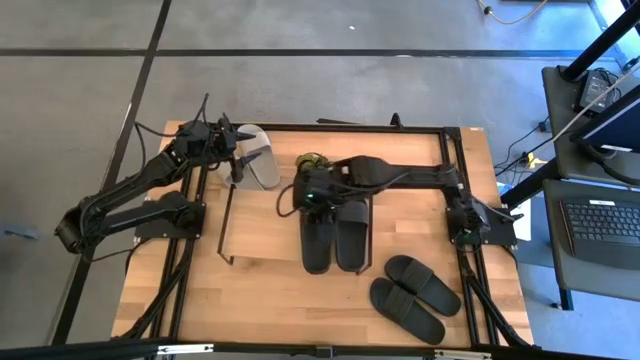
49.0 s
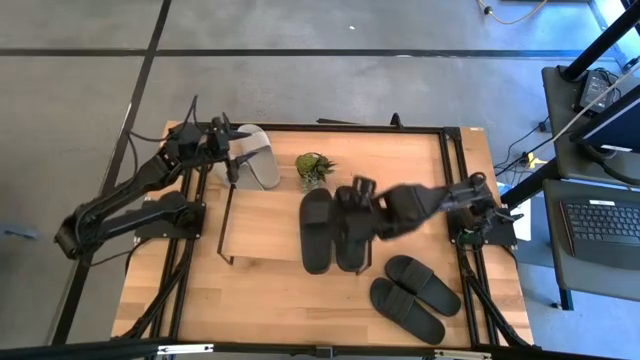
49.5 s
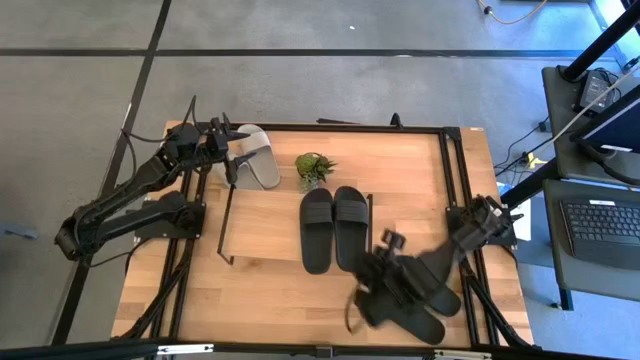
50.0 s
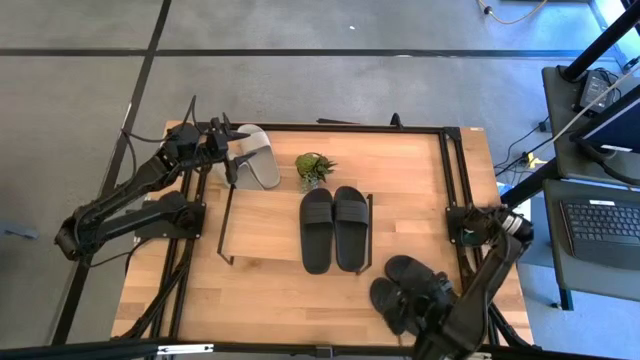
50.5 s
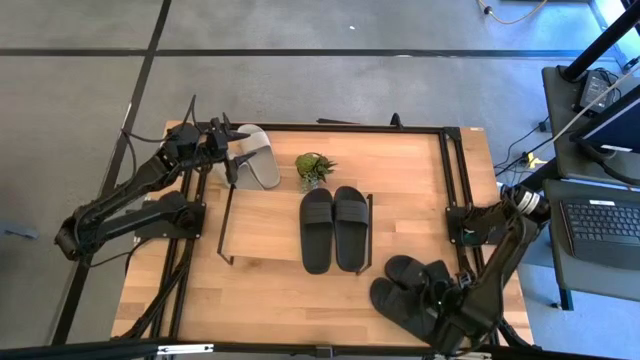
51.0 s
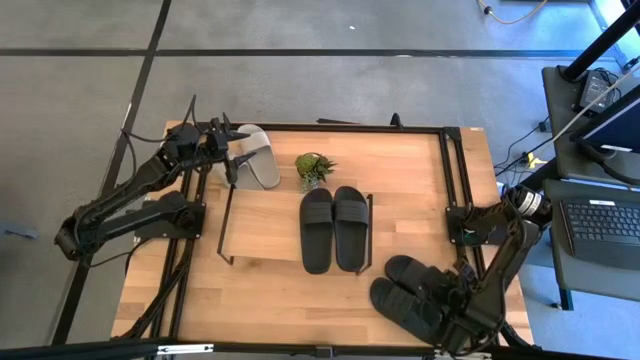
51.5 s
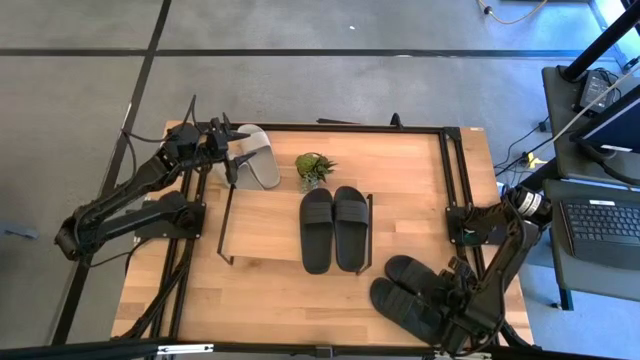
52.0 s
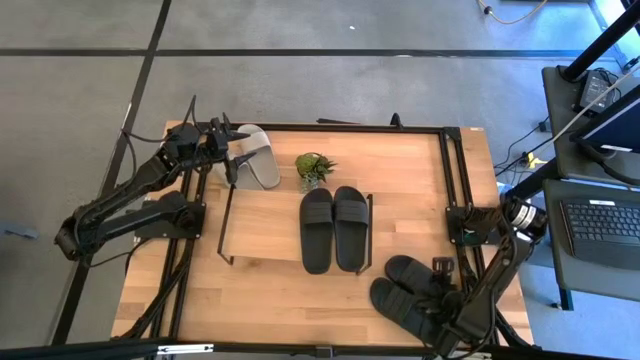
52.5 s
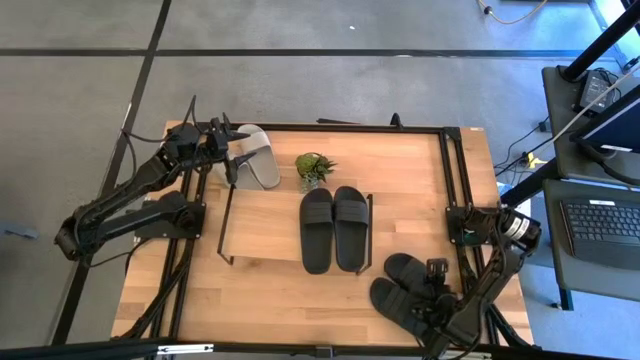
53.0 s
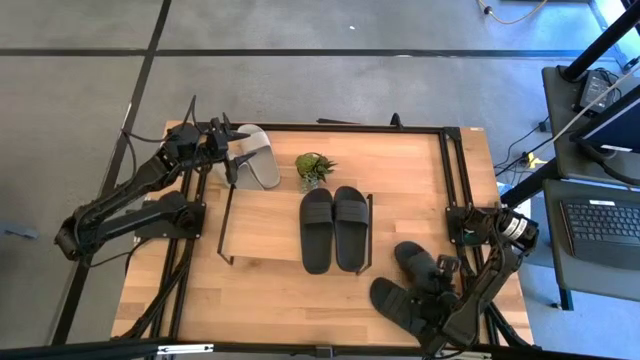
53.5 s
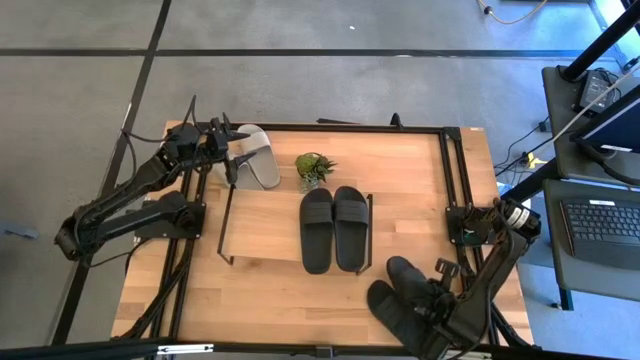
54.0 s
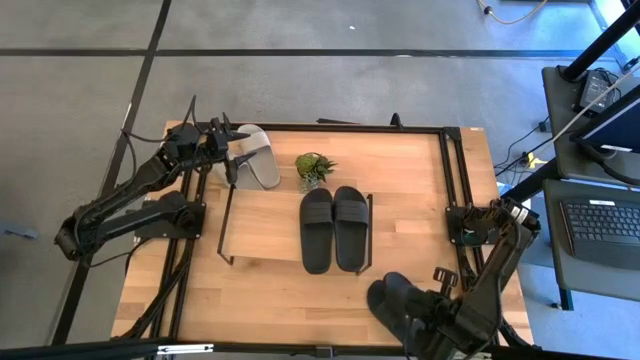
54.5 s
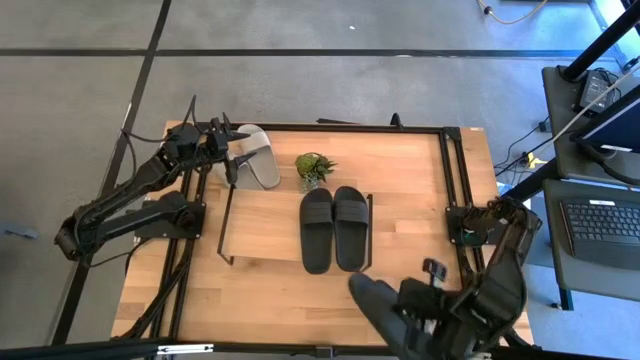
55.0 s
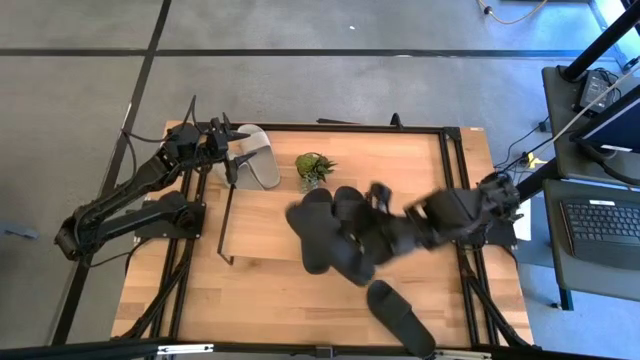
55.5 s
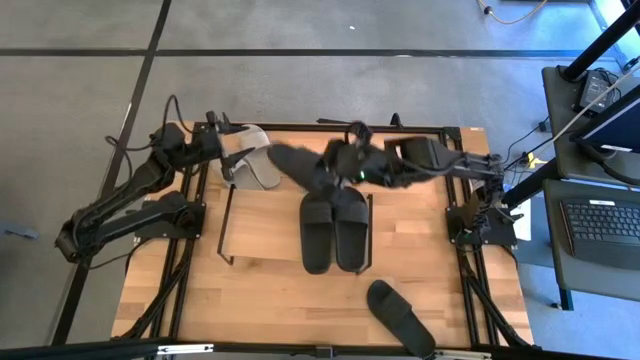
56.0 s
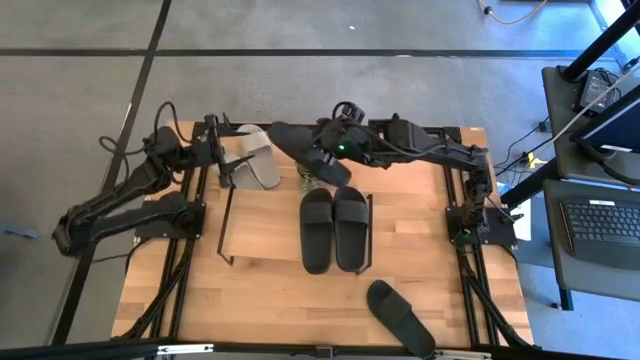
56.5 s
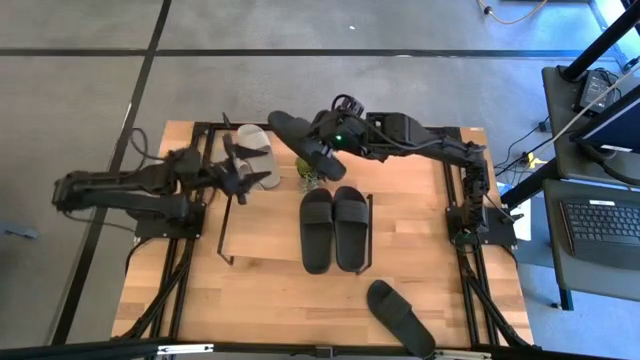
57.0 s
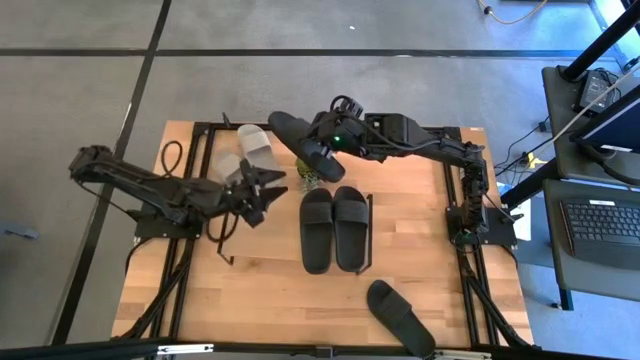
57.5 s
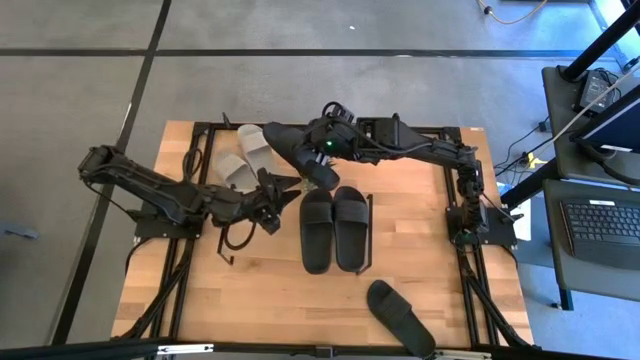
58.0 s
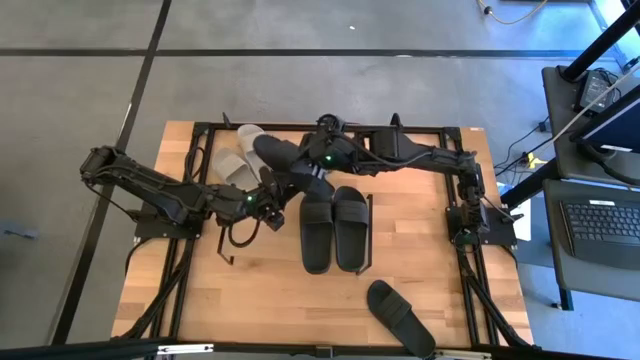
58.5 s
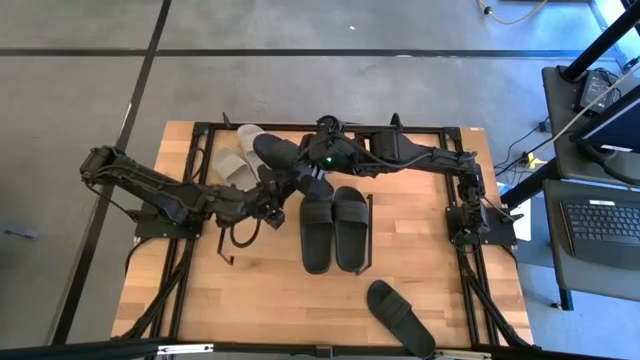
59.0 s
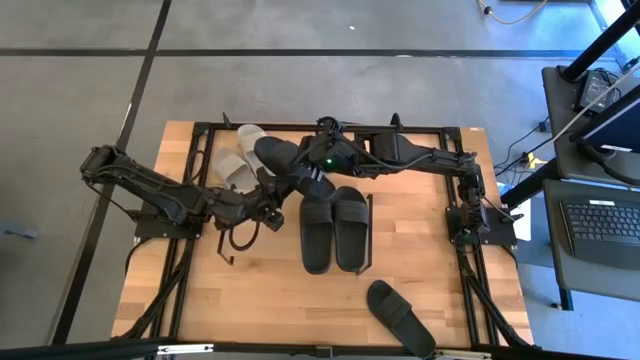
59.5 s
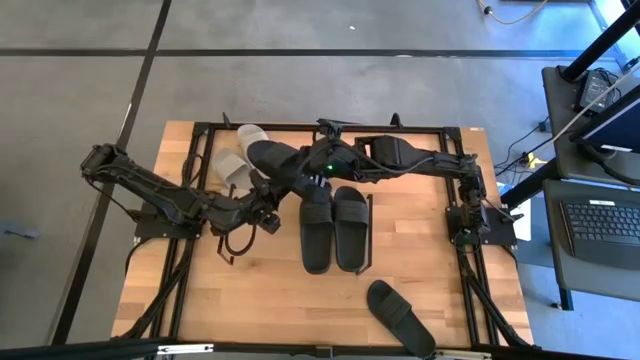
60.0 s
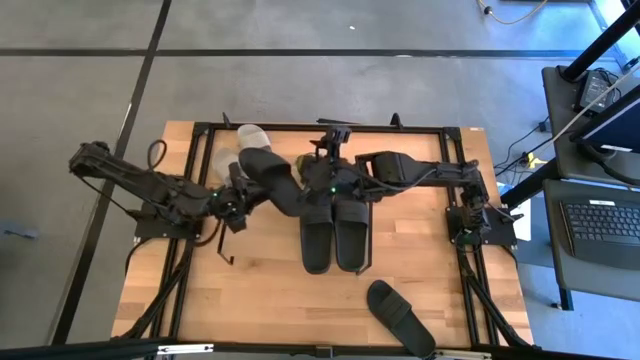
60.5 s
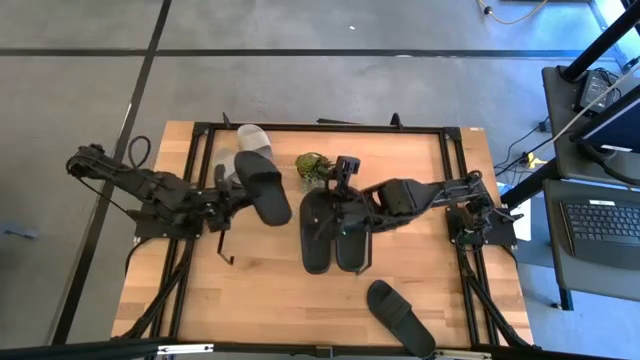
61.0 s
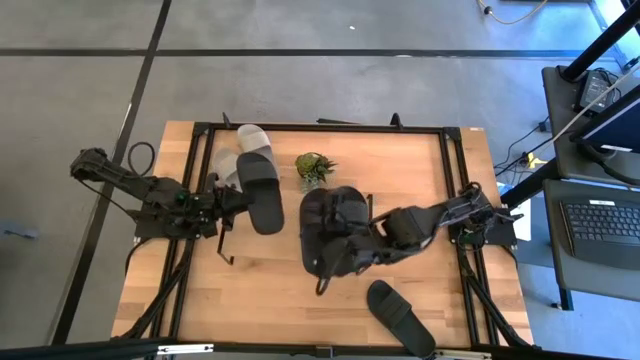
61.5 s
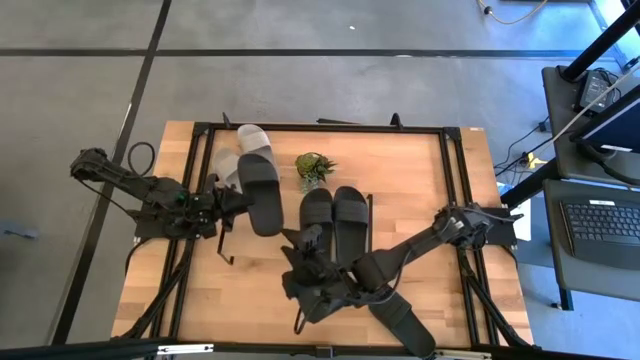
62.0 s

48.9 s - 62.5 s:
Task: Pick and place slides into the shelf
Put the black slide on the shelf

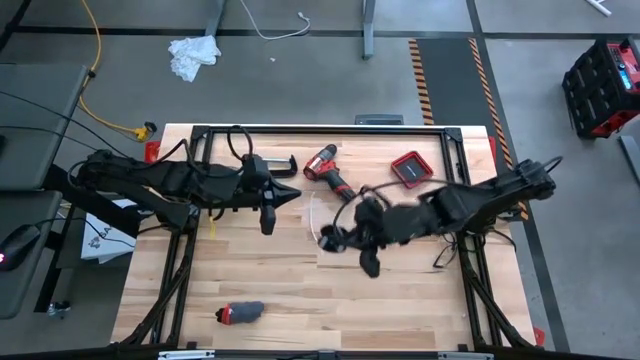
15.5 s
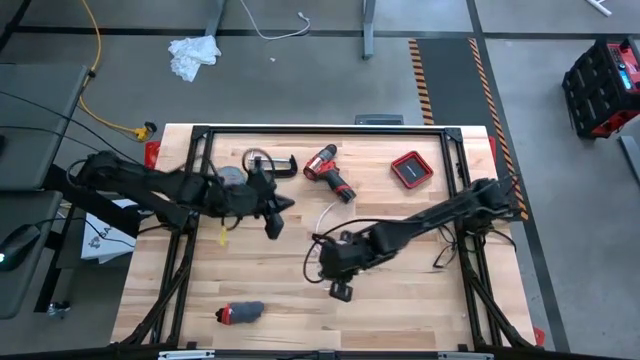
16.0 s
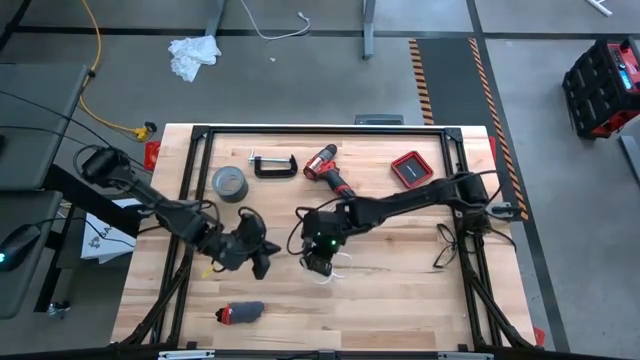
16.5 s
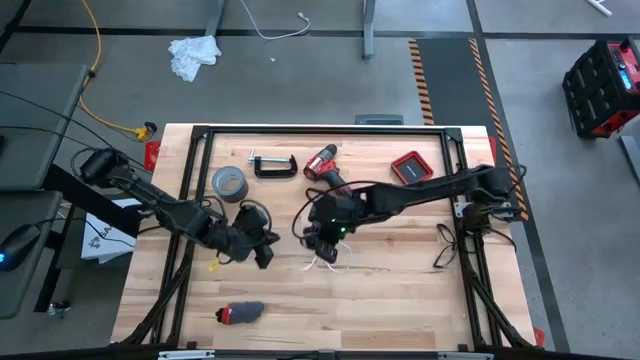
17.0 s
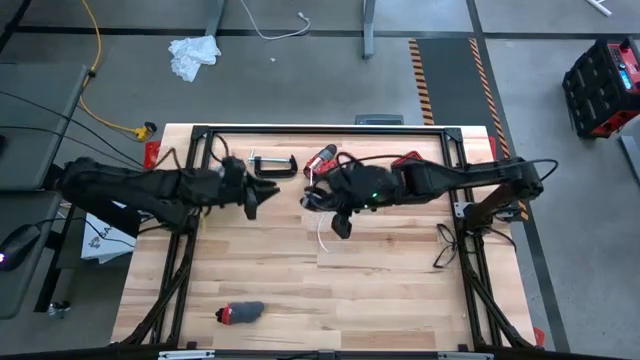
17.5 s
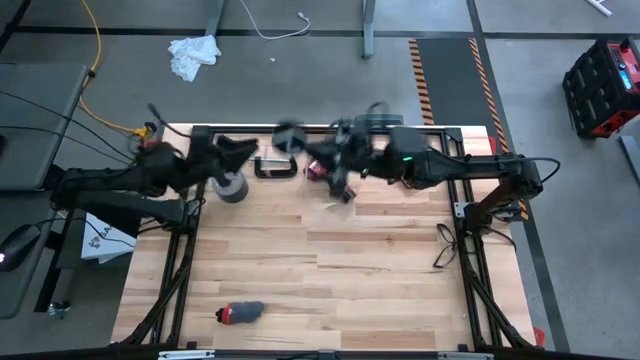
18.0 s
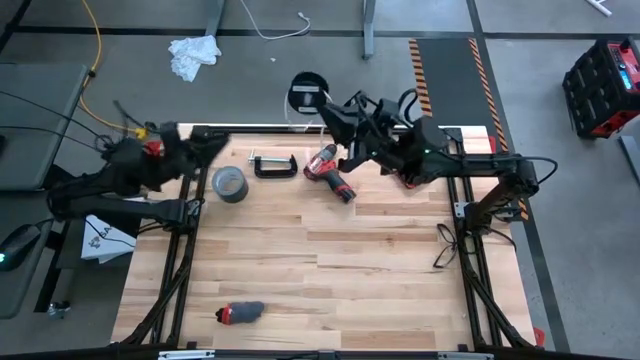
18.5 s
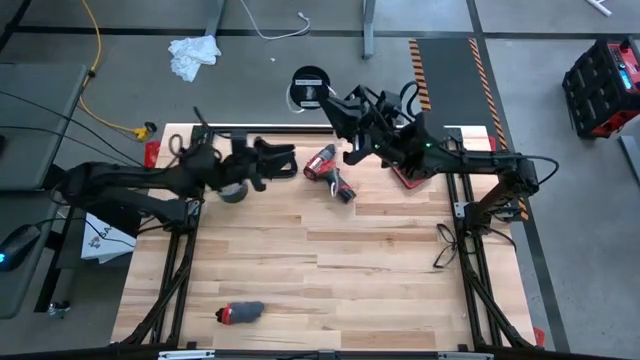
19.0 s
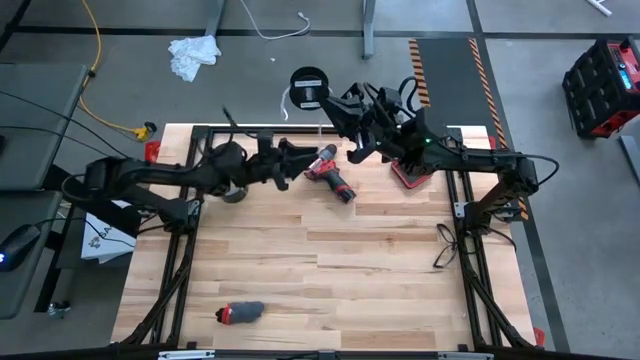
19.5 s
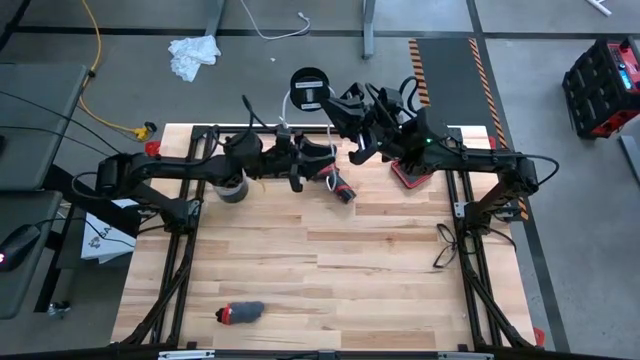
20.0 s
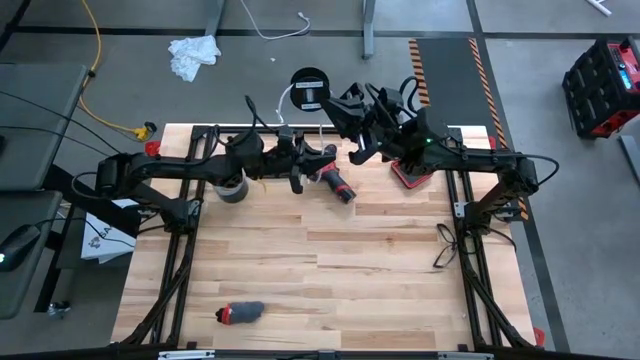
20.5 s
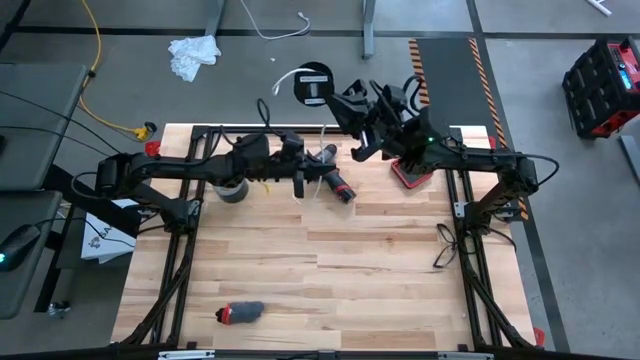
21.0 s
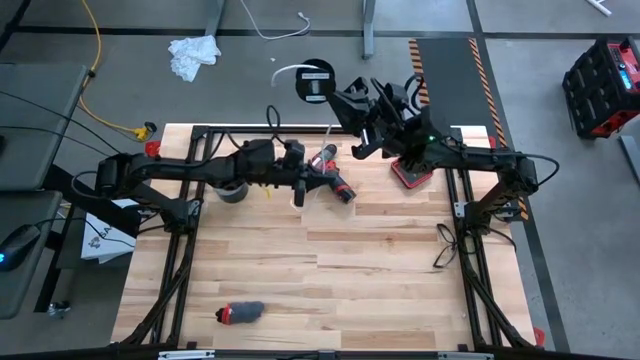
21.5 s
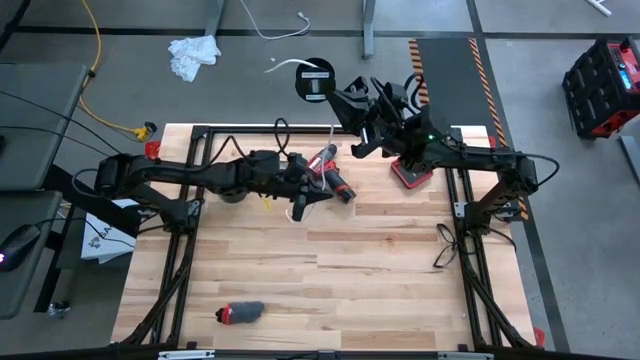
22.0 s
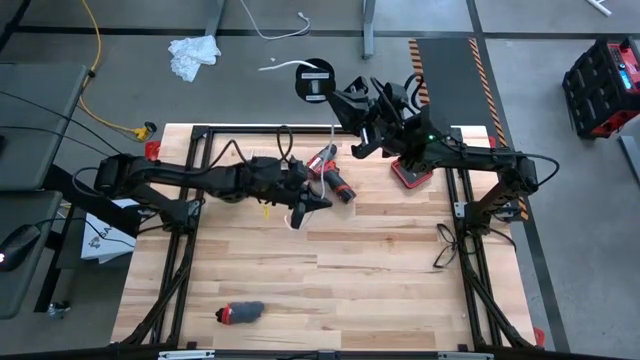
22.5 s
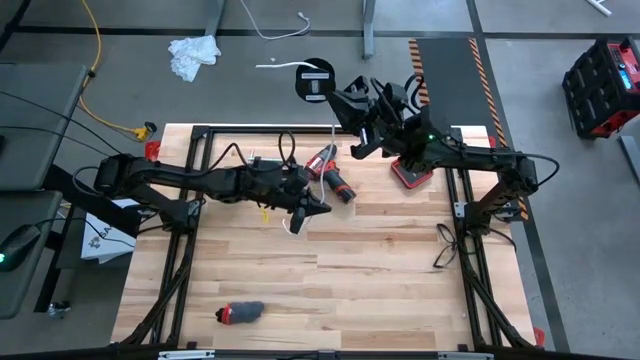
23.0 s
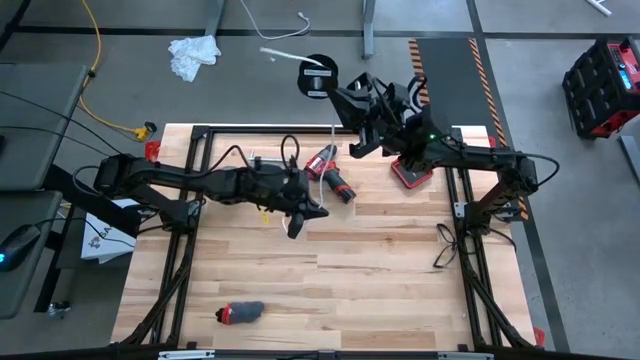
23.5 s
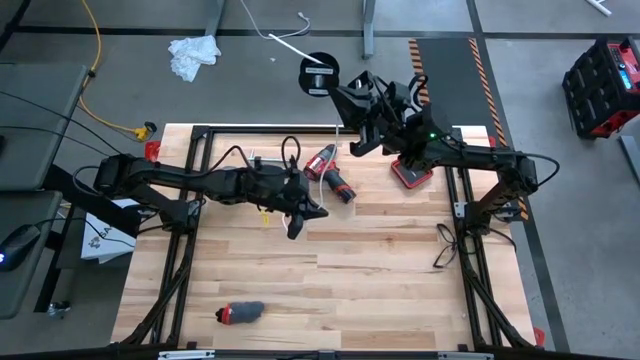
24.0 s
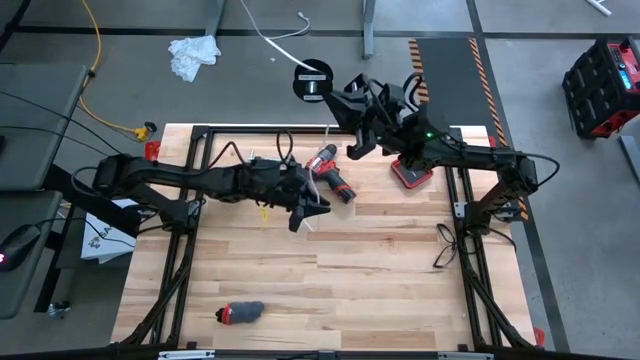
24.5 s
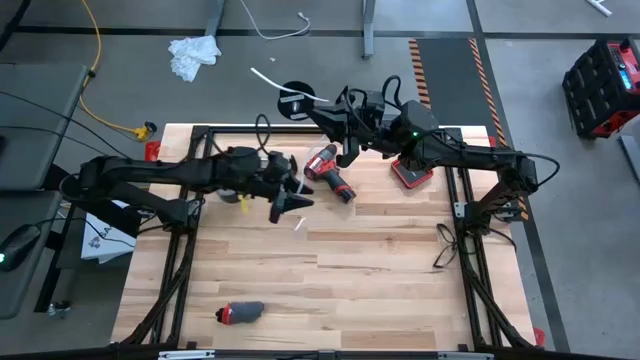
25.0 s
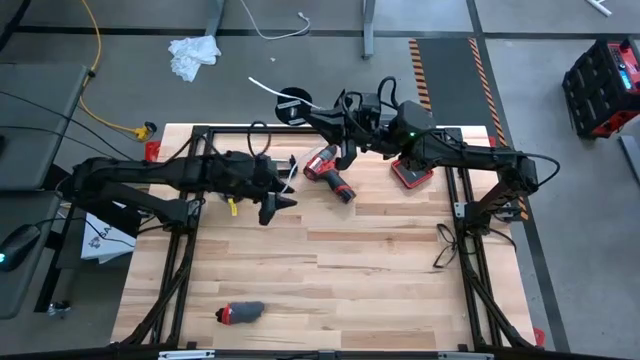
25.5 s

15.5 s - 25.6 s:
Task: Coil cords
Uncoil the white cable wire from the black spool
